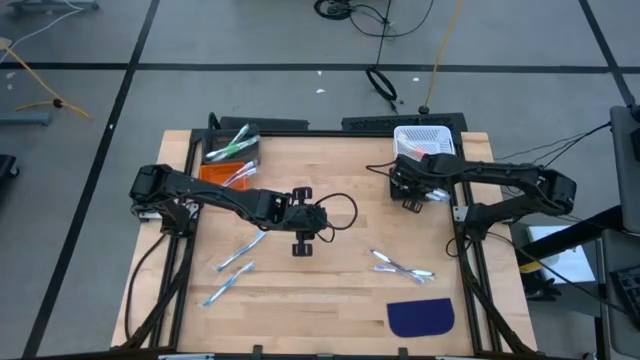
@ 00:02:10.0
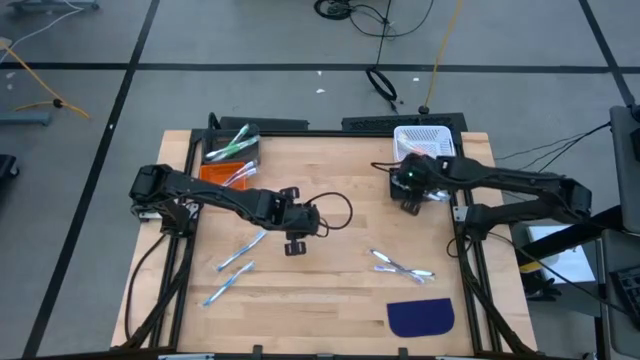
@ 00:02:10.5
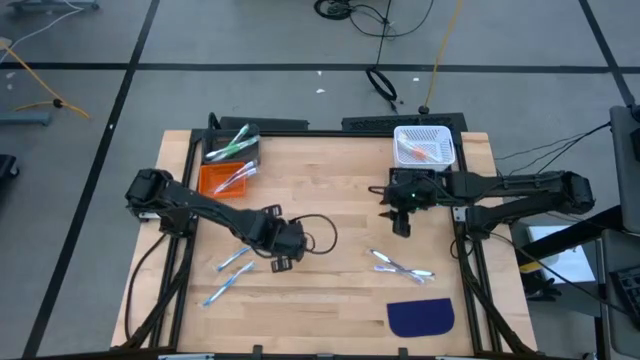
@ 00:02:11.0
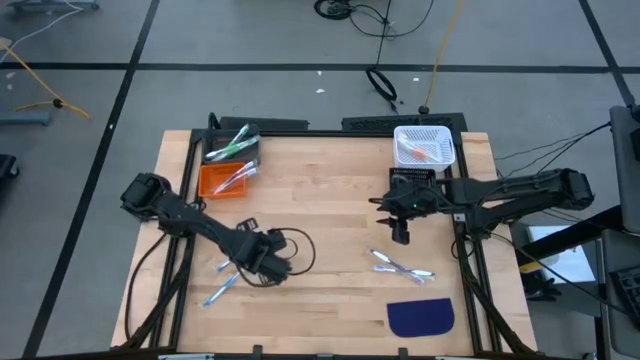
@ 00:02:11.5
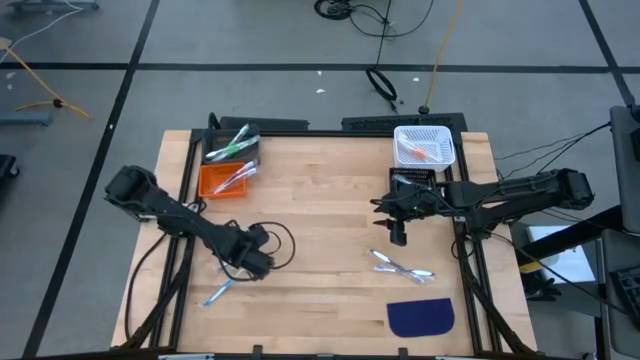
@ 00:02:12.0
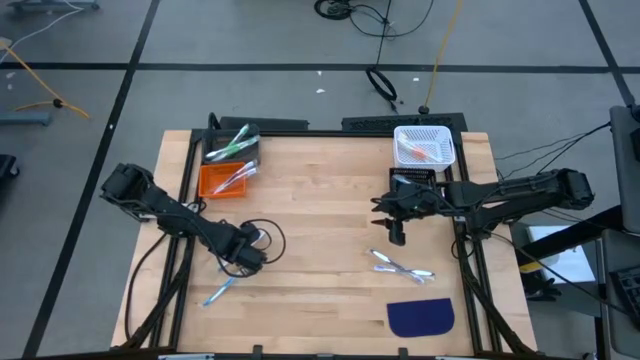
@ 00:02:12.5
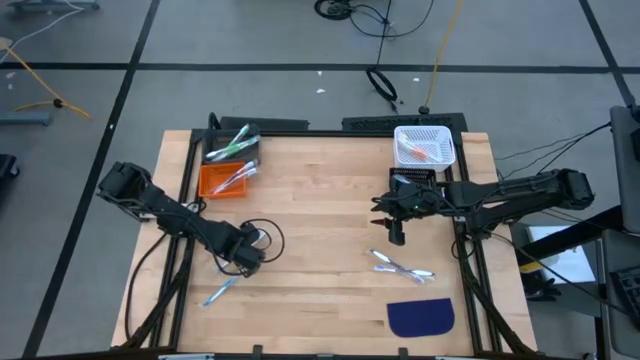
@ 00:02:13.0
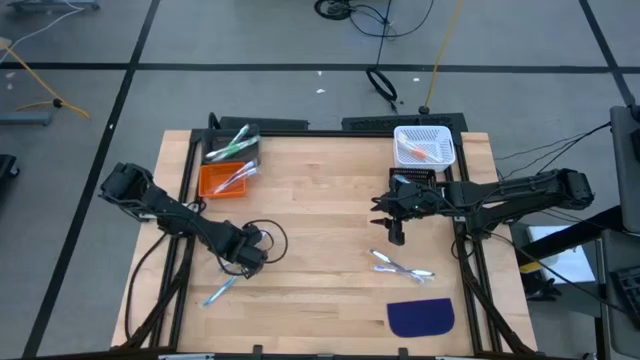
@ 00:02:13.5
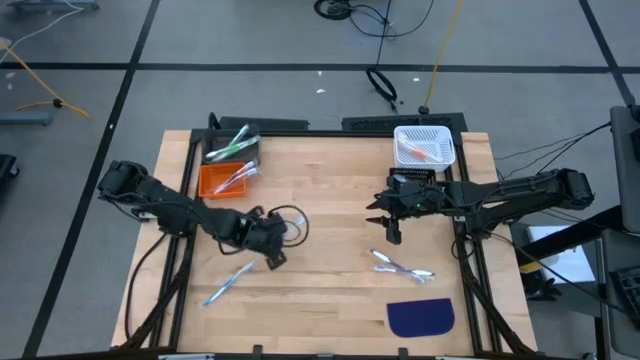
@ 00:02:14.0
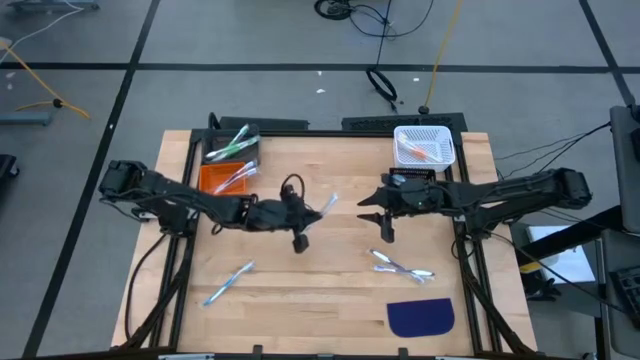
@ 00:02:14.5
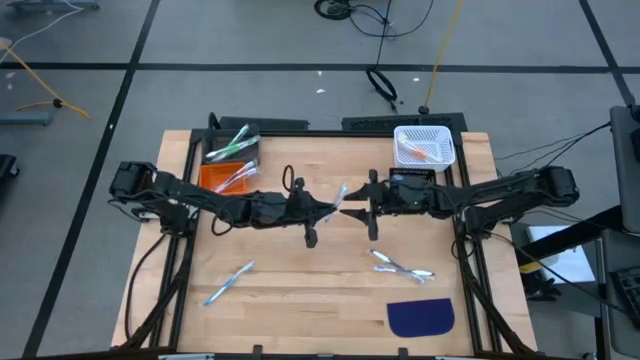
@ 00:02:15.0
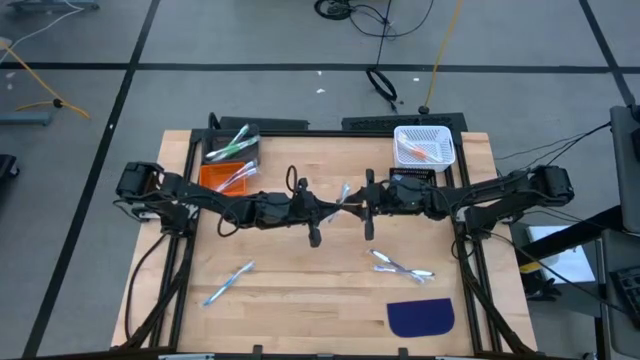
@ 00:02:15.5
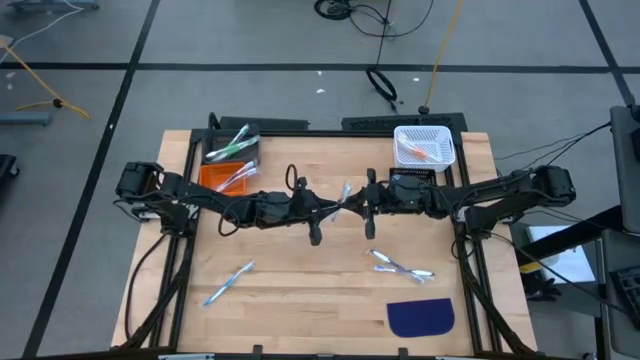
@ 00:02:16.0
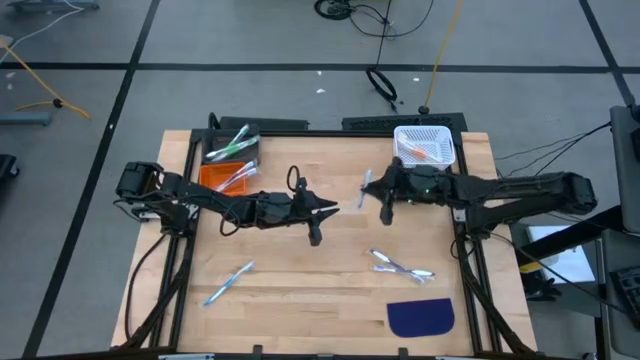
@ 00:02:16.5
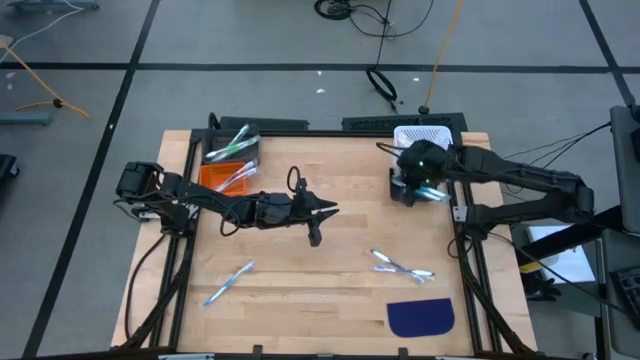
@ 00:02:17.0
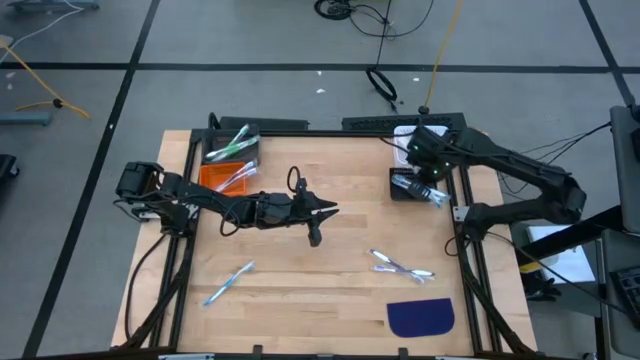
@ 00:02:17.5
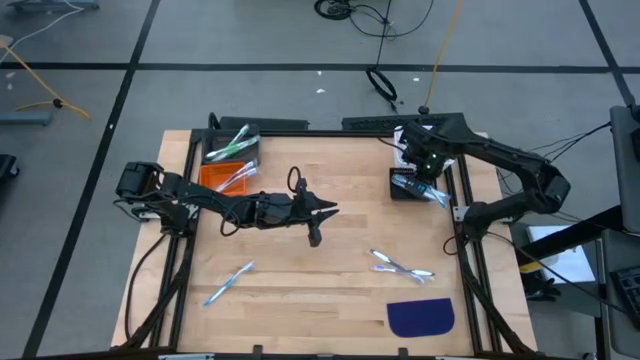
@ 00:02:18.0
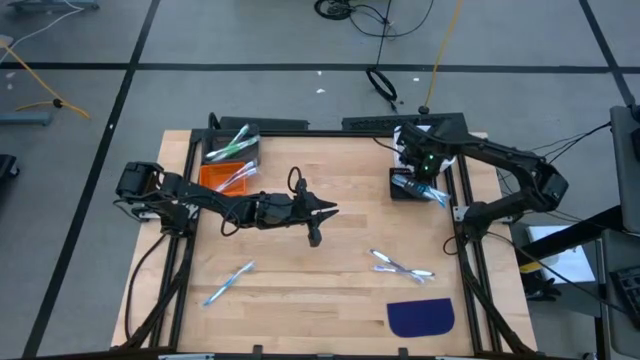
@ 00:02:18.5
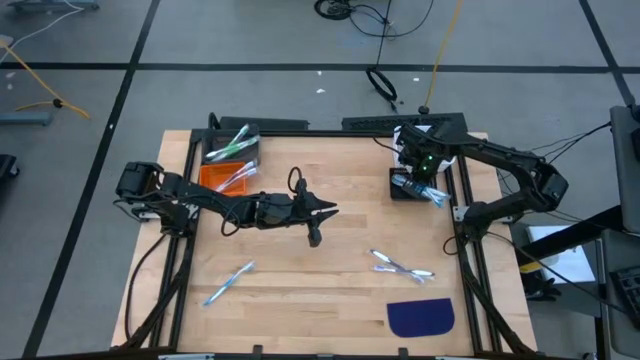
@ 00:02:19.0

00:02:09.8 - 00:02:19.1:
Task: Pick & Place Toothbrushes
Put the blue toothbrush into the black bin

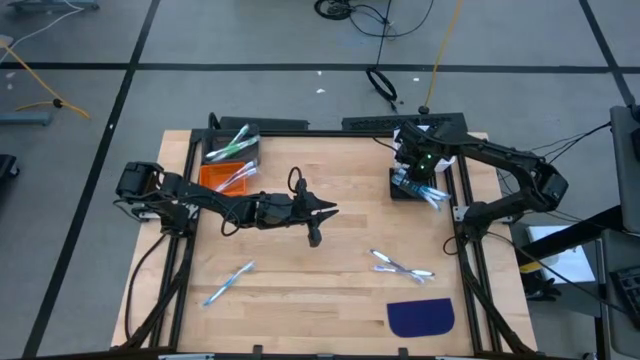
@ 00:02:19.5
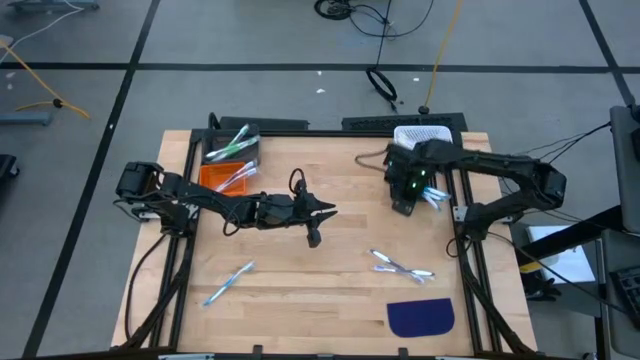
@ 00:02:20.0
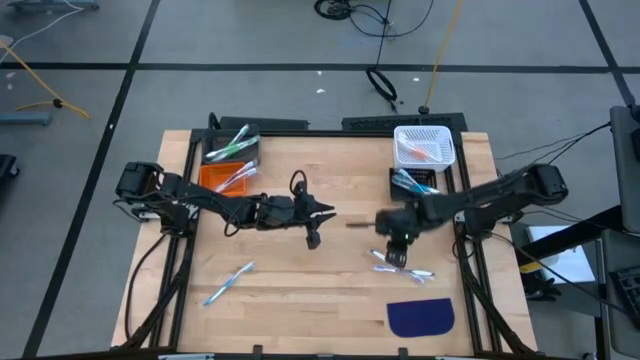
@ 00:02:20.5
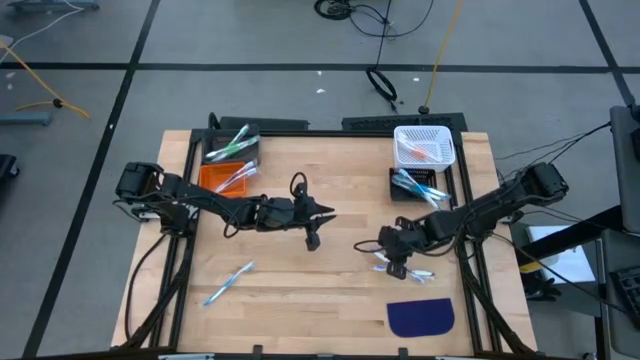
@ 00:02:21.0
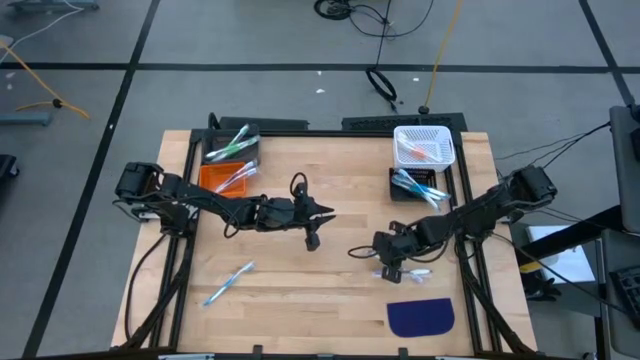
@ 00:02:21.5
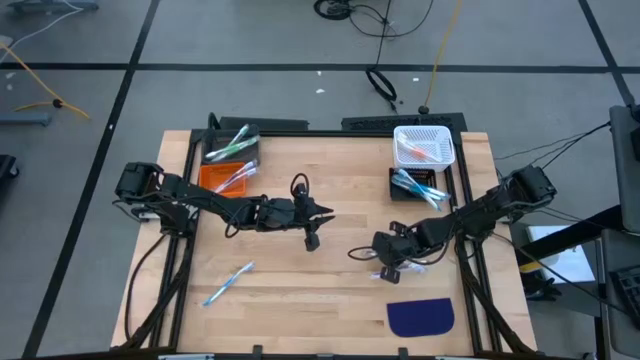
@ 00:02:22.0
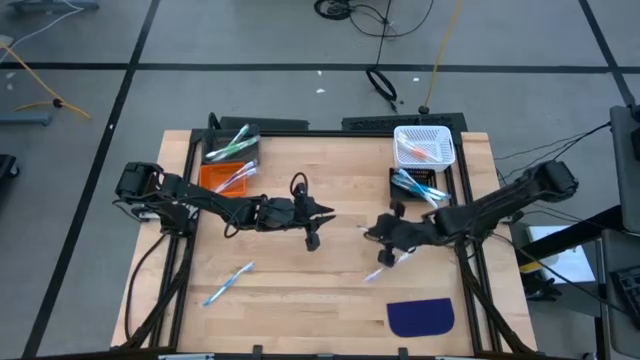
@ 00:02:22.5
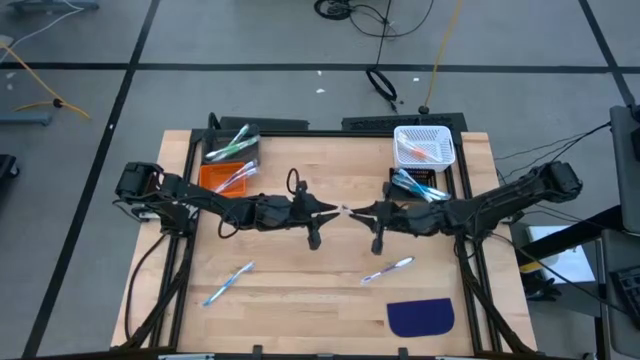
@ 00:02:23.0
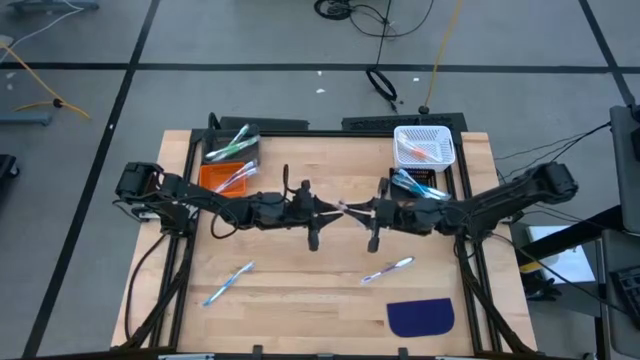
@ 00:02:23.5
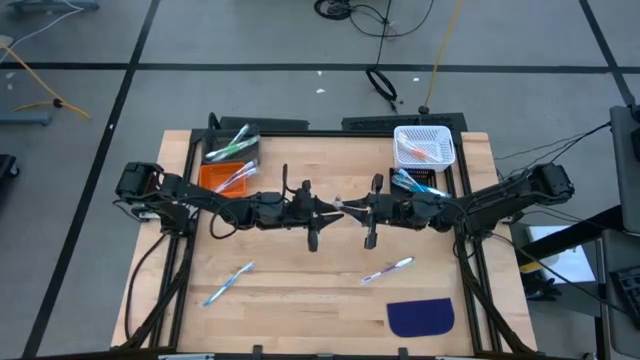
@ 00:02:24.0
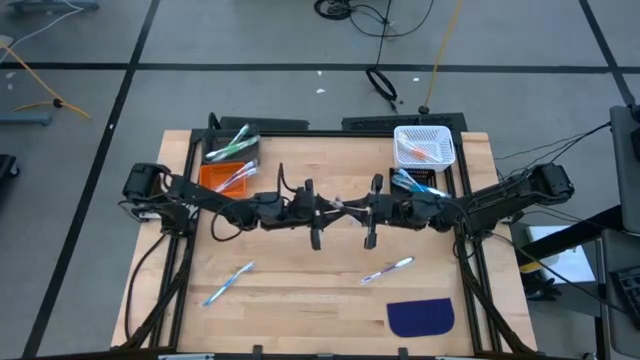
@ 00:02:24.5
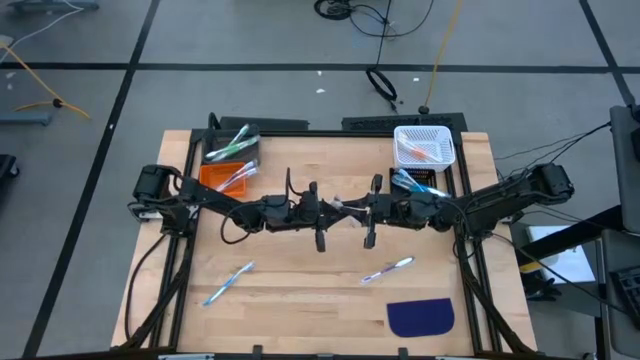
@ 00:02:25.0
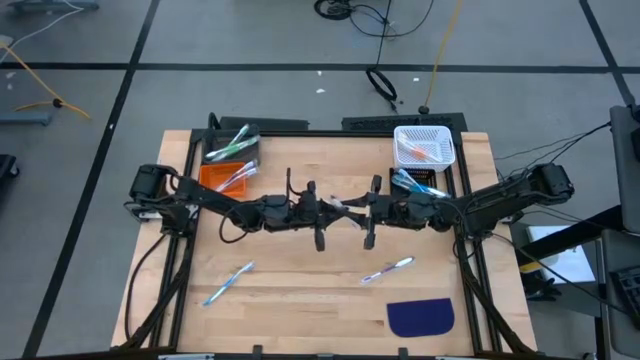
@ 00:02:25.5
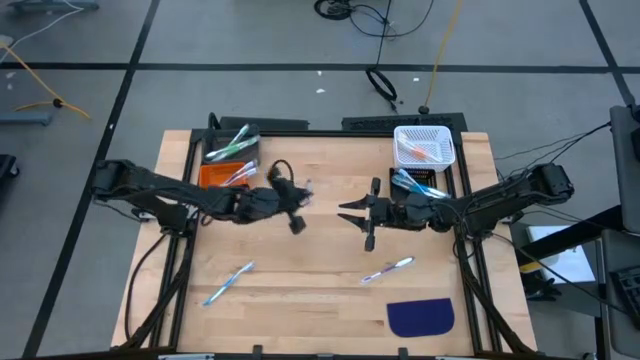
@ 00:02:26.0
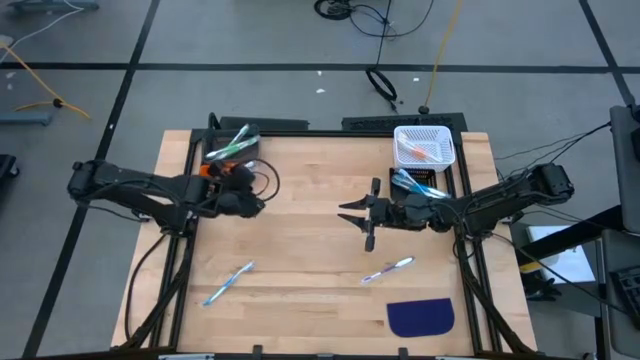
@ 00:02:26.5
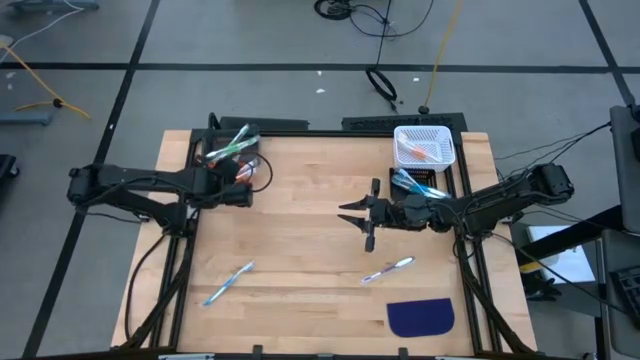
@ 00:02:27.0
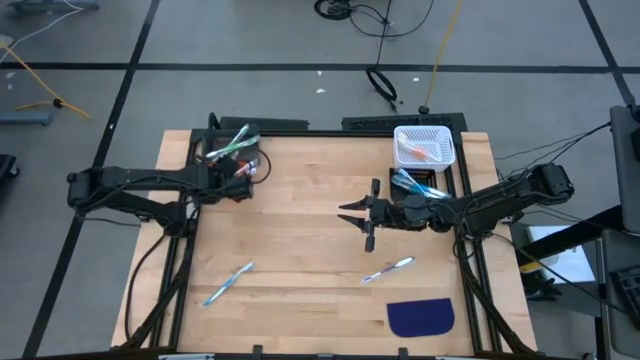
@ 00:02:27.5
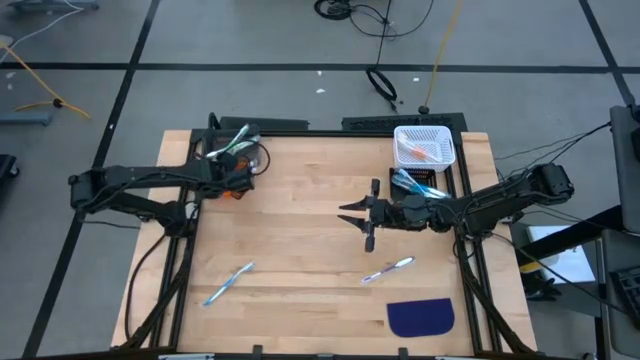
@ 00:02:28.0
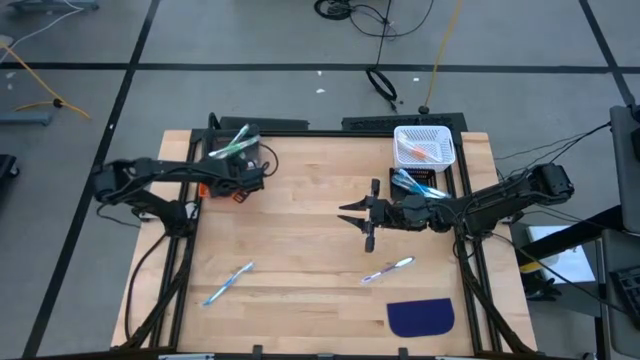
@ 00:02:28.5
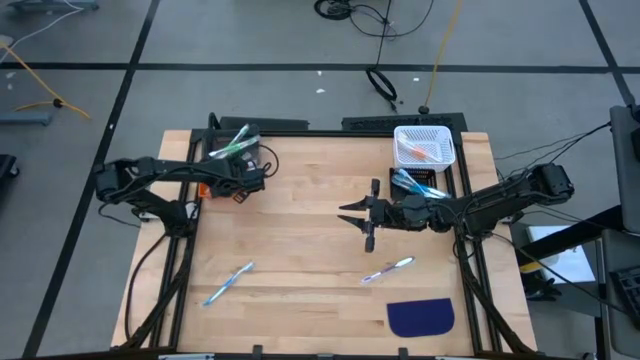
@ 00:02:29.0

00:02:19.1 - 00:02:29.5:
Put the purple toothbrush in the orange bin

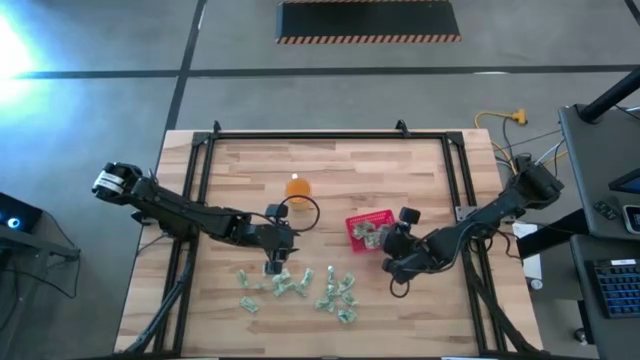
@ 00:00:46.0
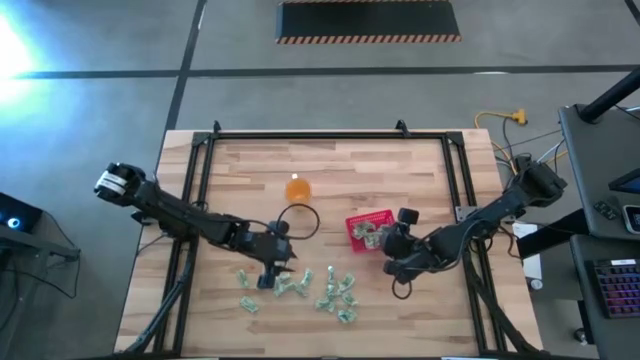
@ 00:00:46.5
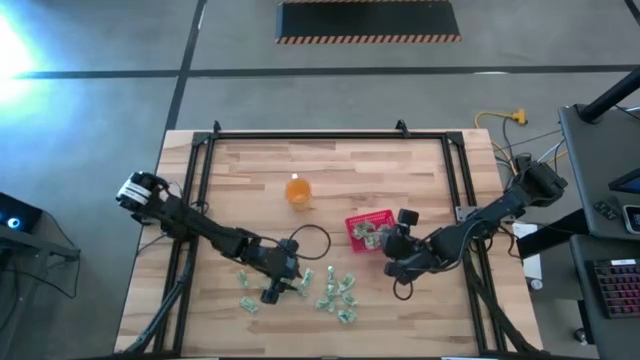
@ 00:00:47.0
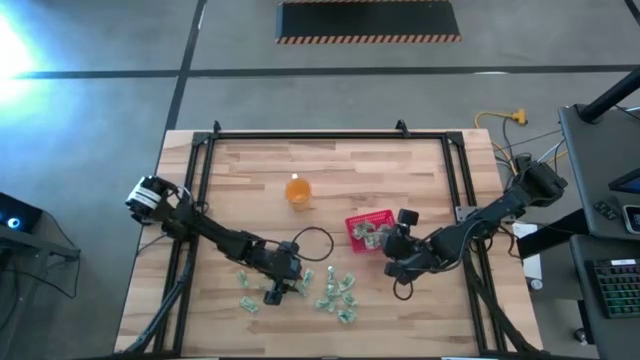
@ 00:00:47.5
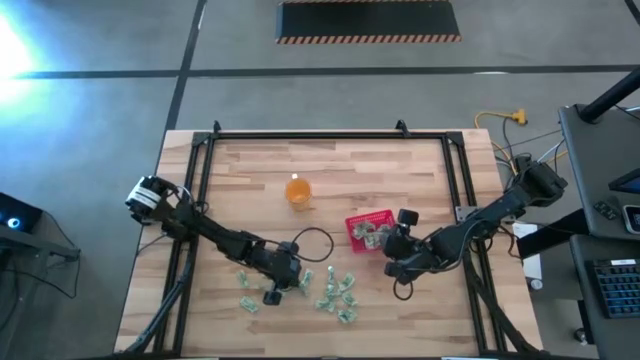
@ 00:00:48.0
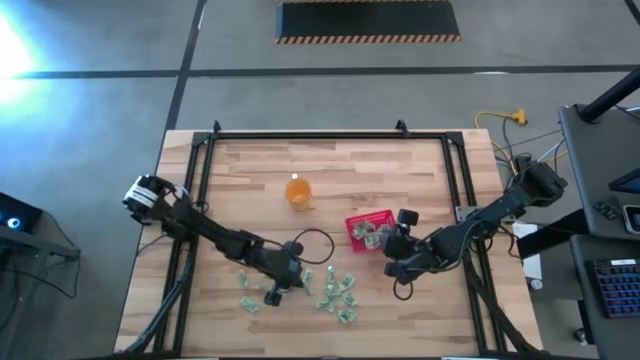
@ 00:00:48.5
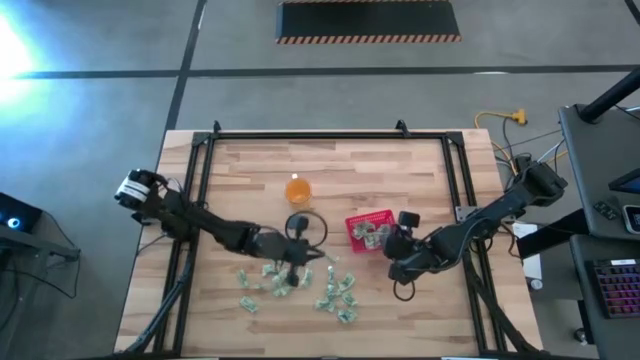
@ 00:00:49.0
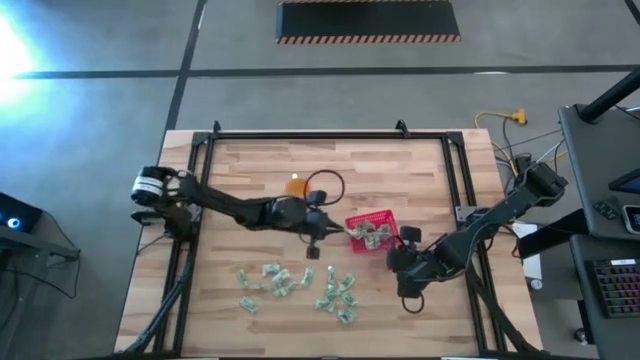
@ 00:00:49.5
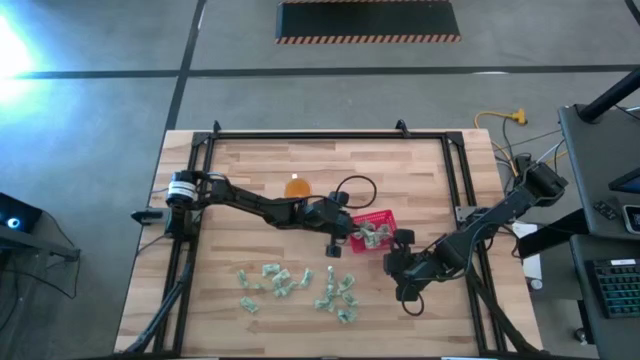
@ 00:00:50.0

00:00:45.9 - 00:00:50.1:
Task: Pick and place Stevia / Truvia into bins
Put the stevia packet into the basket
